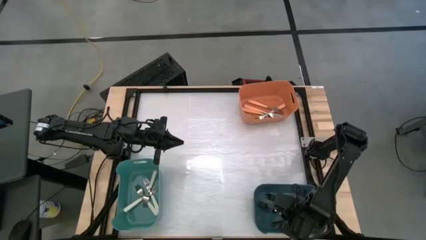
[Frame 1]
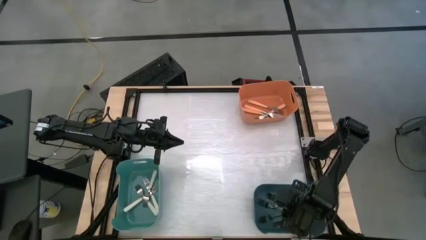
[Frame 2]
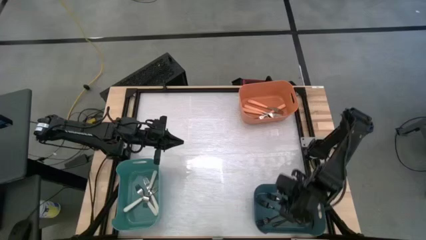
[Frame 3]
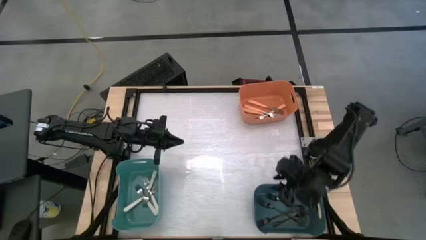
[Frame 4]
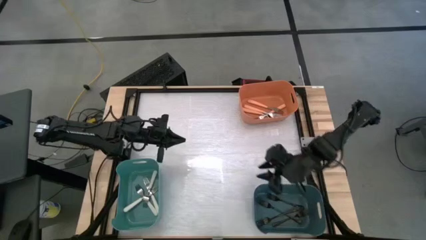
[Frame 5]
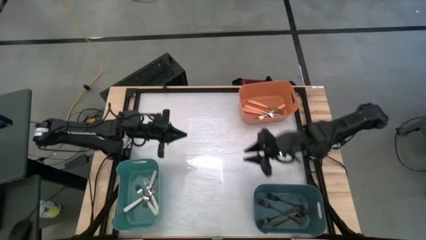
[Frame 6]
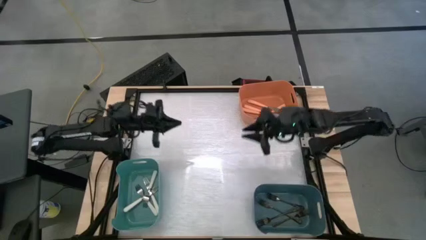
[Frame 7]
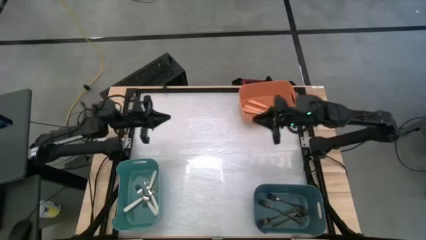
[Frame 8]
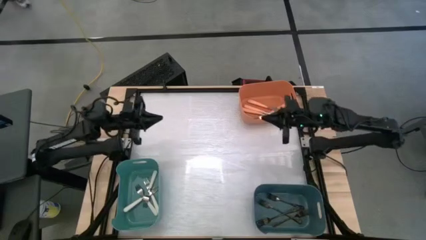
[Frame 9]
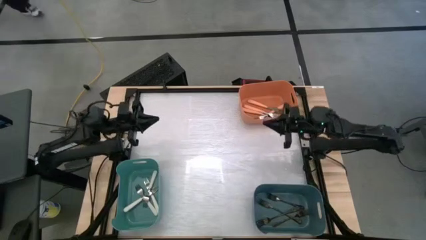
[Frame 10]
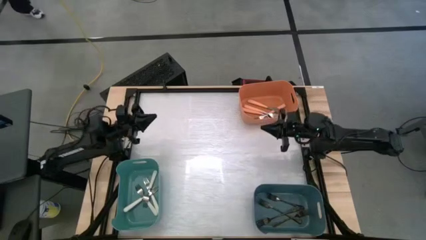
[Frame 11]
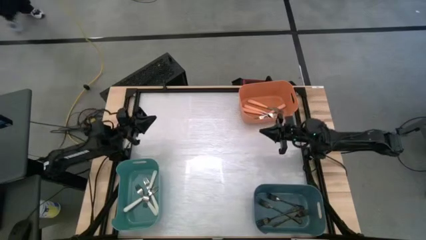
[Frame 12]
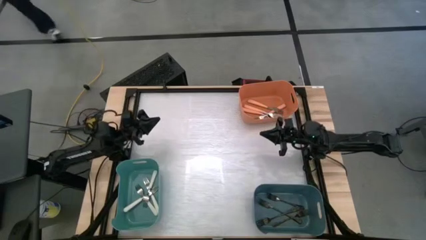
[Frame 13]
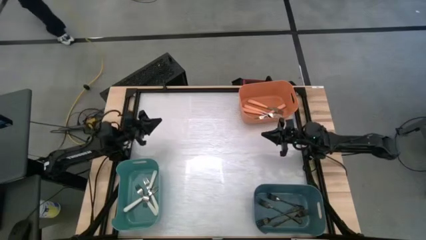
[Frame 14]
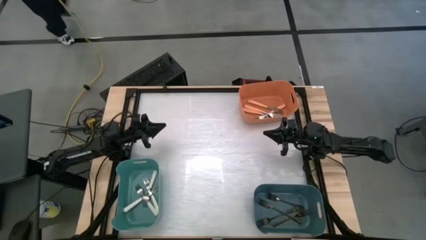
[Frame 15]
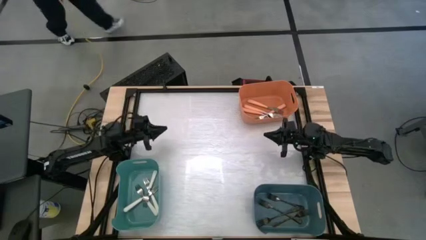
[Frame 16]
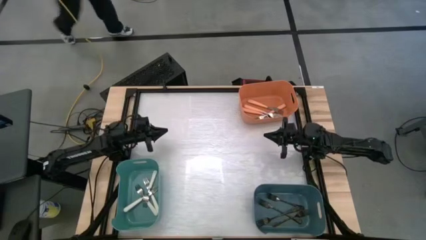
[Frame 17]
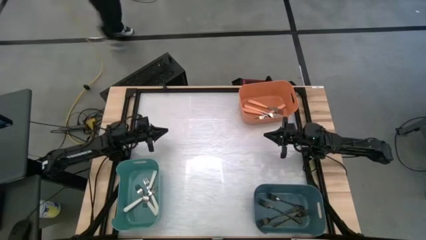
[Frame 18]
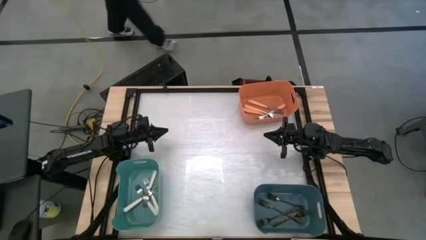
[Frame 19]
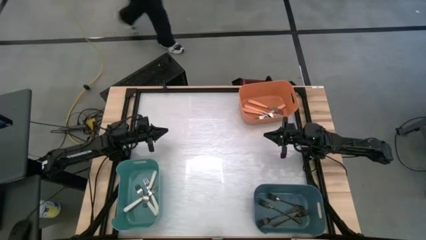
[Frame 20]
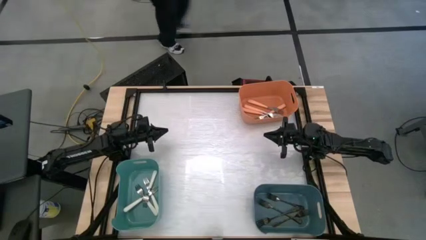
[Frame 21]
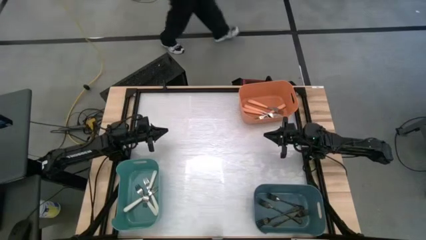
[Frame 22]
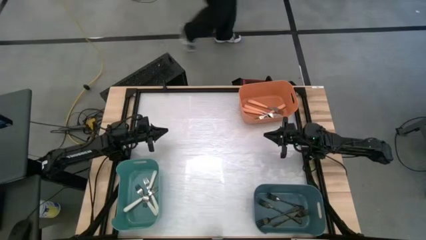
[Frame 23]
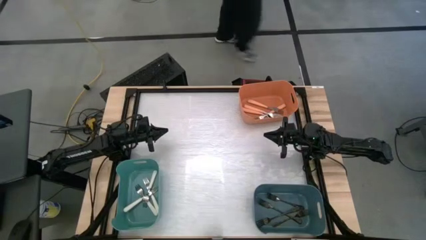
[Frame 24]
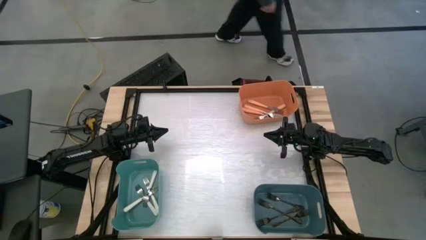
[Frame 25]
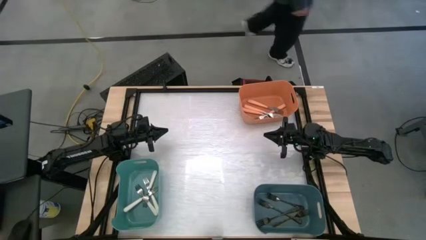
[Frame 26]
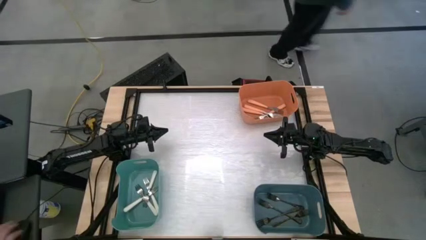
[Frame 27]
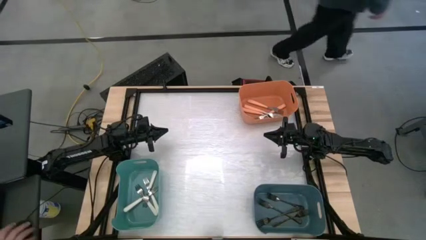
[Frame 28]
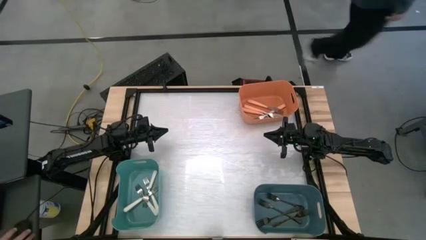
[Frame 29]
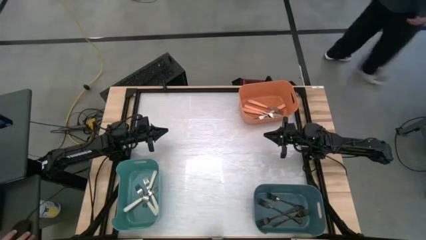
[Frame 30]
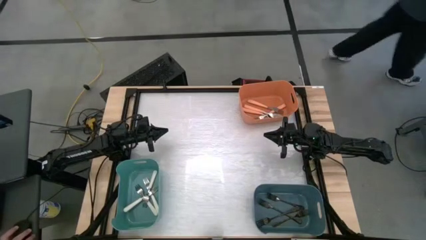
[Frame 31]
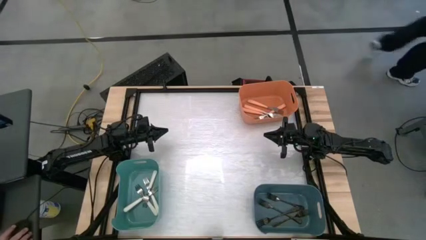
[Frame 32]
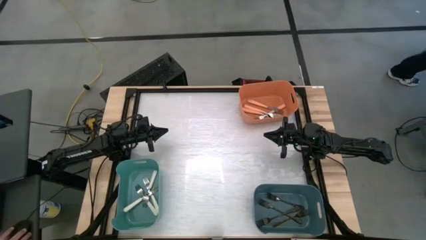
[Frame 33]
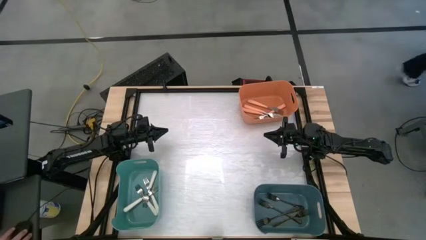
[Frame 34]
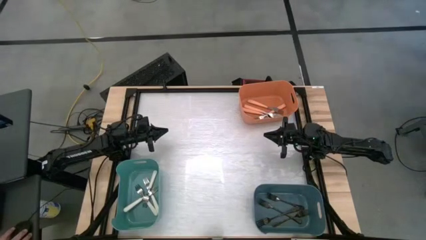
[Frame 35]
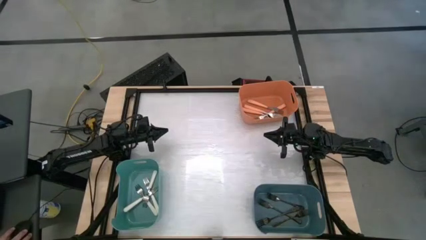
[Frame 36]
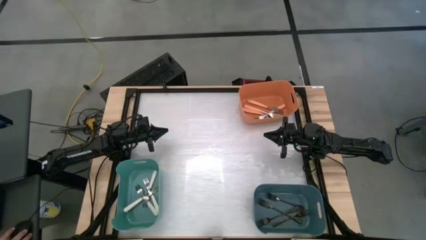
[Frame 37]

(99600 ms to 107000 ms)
Task: Sort silverware by color (type)
Return to Home Position

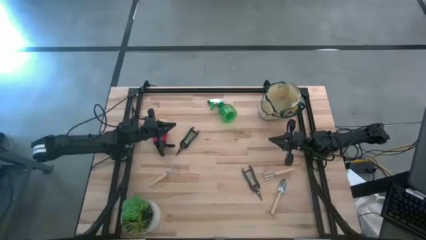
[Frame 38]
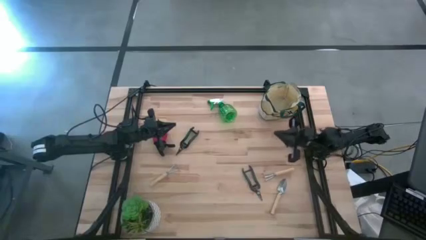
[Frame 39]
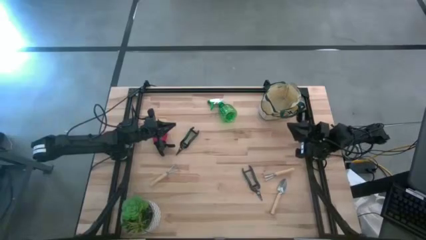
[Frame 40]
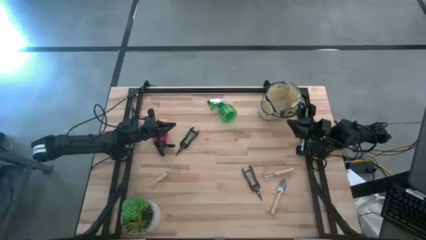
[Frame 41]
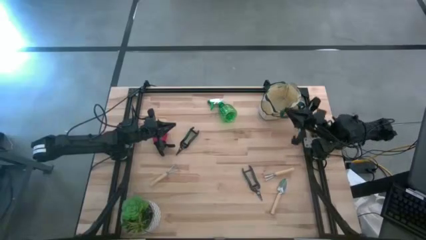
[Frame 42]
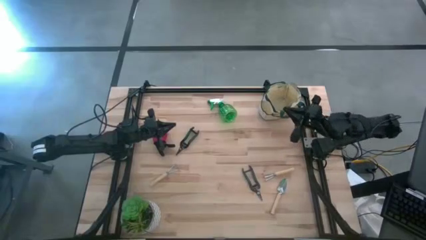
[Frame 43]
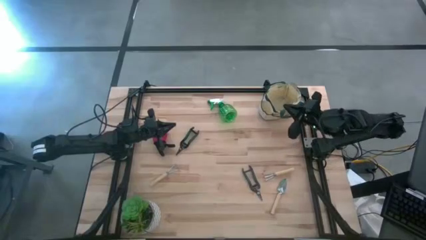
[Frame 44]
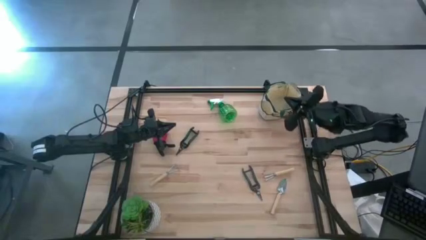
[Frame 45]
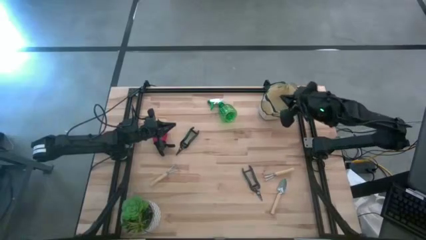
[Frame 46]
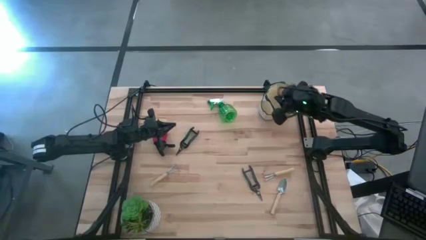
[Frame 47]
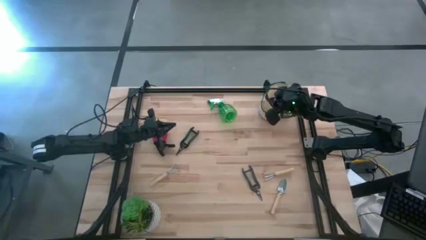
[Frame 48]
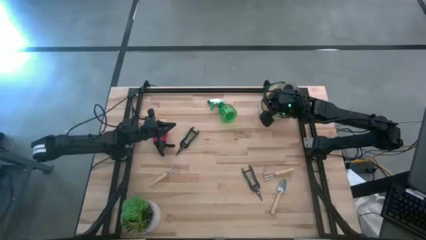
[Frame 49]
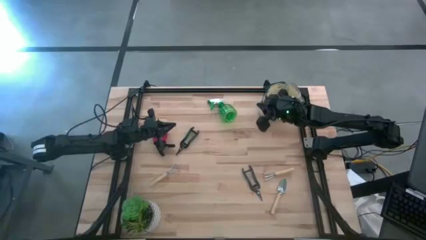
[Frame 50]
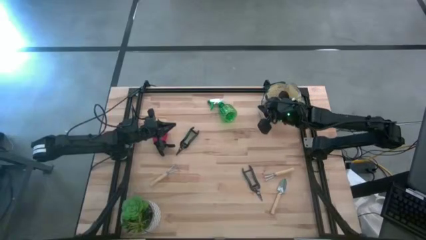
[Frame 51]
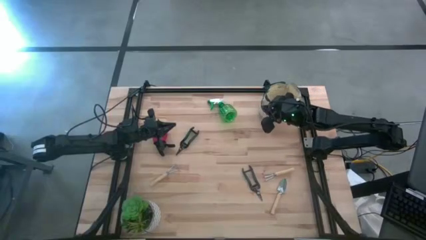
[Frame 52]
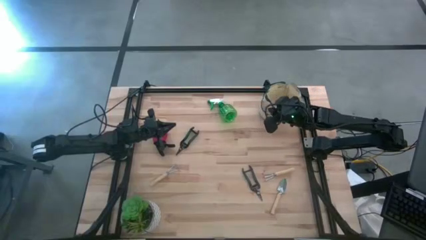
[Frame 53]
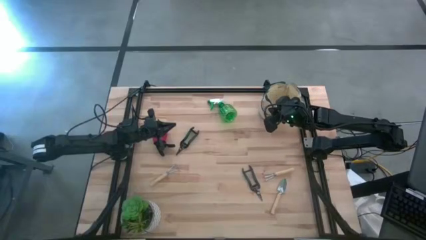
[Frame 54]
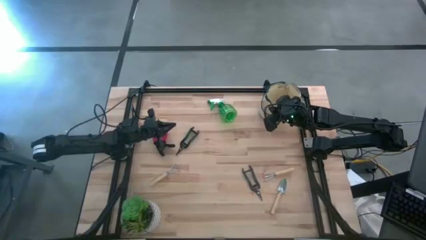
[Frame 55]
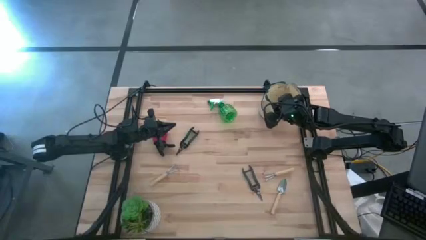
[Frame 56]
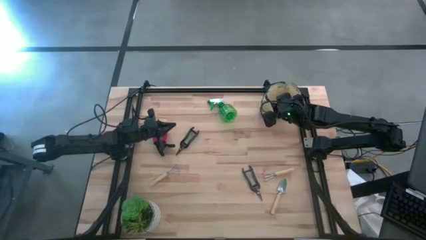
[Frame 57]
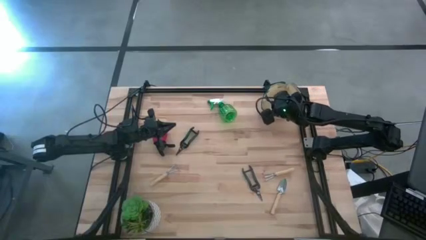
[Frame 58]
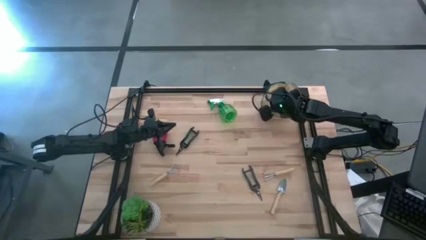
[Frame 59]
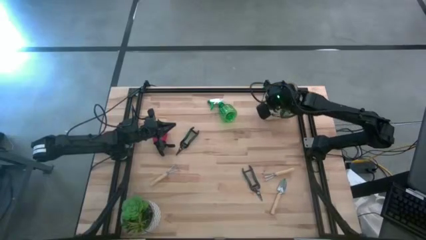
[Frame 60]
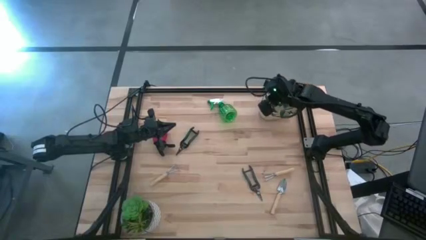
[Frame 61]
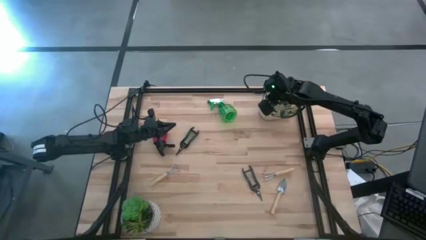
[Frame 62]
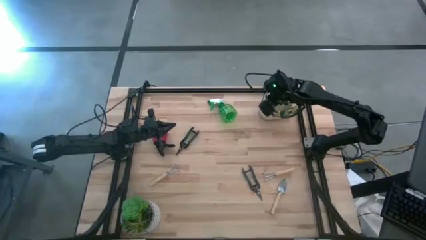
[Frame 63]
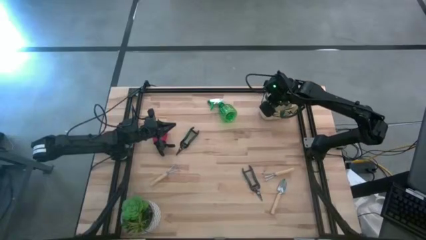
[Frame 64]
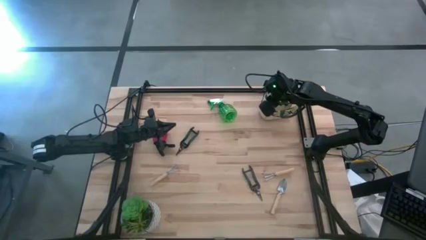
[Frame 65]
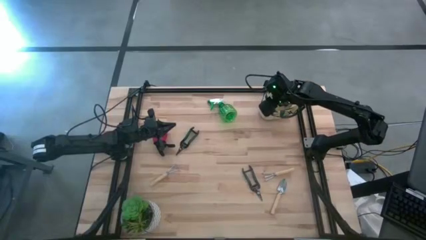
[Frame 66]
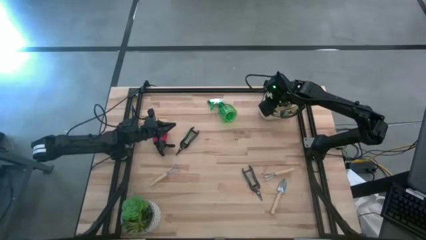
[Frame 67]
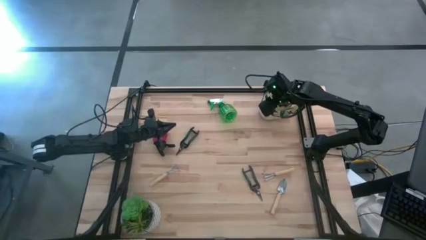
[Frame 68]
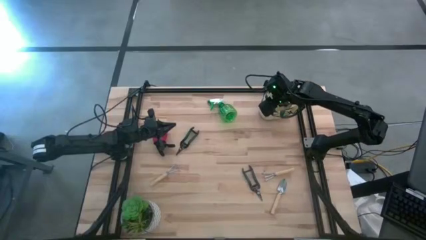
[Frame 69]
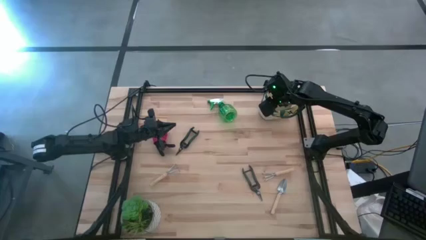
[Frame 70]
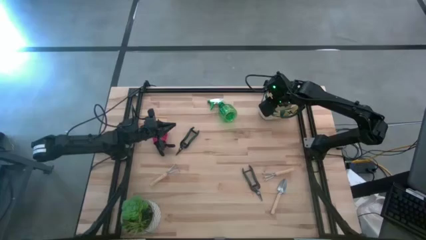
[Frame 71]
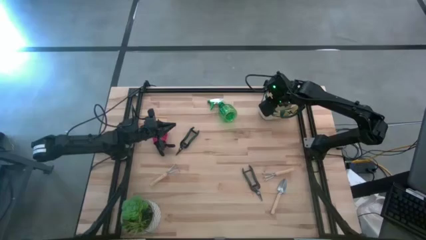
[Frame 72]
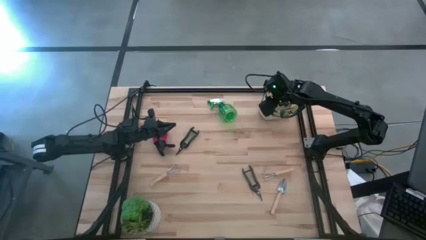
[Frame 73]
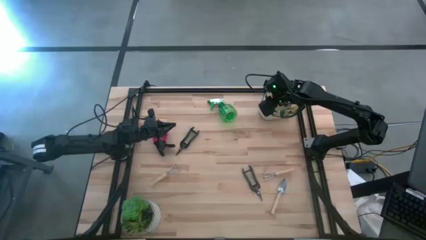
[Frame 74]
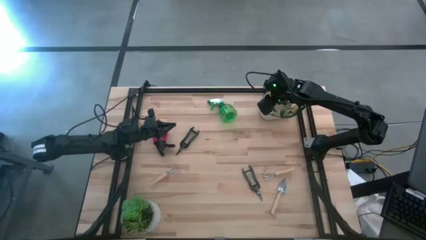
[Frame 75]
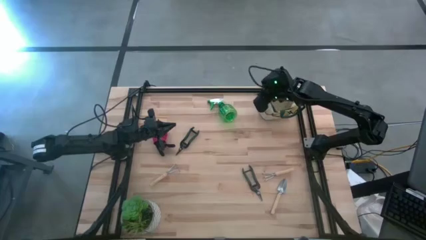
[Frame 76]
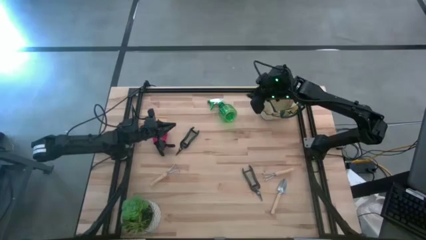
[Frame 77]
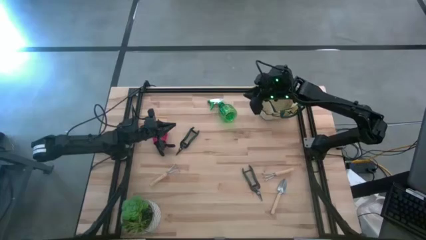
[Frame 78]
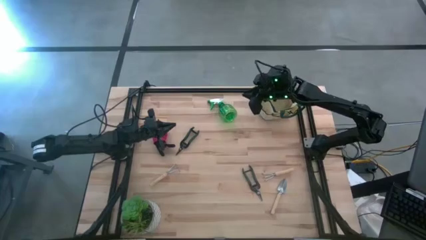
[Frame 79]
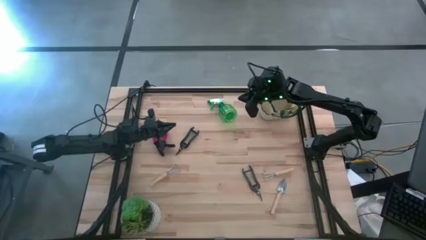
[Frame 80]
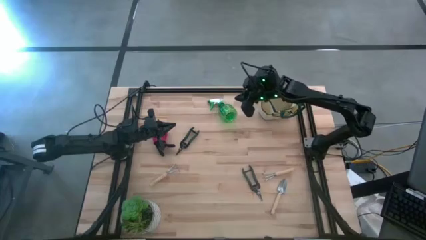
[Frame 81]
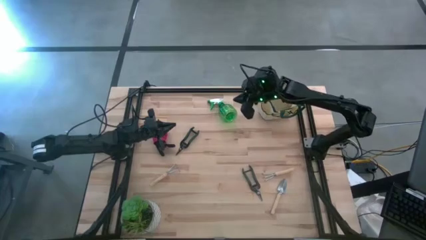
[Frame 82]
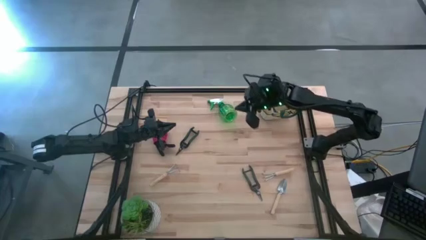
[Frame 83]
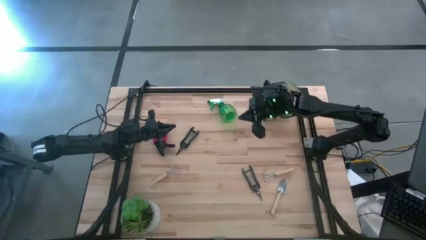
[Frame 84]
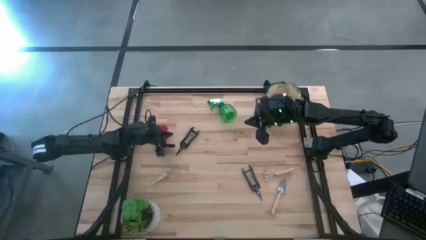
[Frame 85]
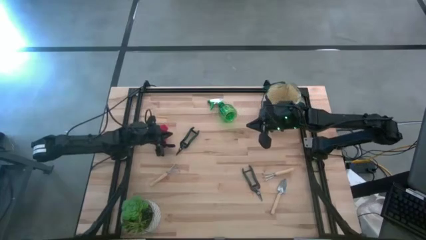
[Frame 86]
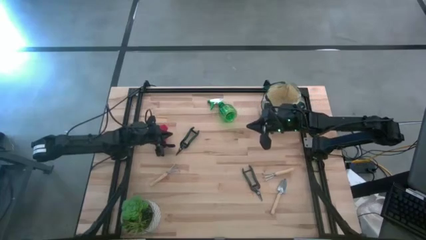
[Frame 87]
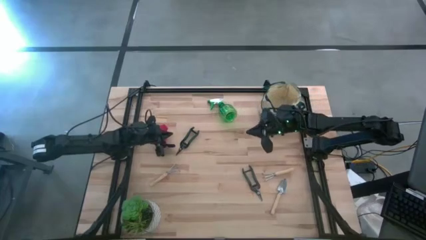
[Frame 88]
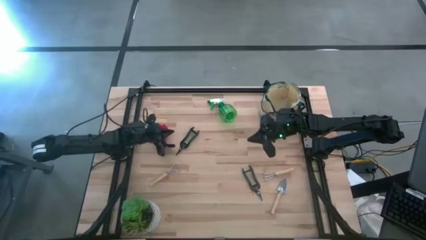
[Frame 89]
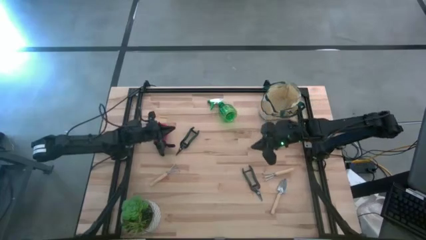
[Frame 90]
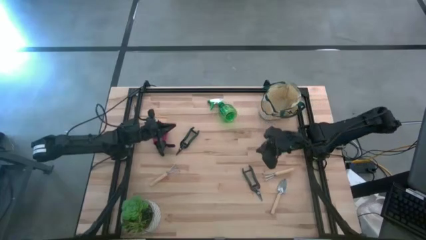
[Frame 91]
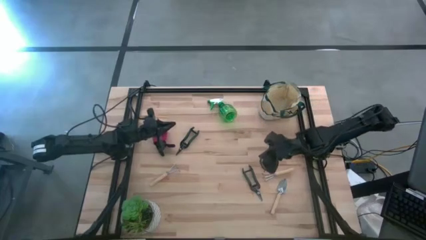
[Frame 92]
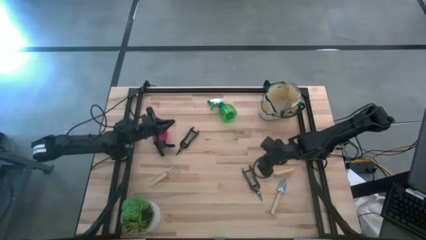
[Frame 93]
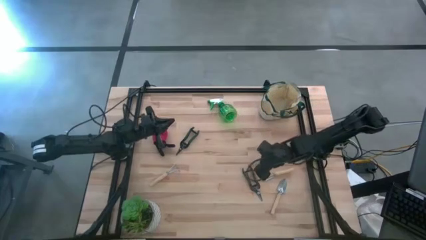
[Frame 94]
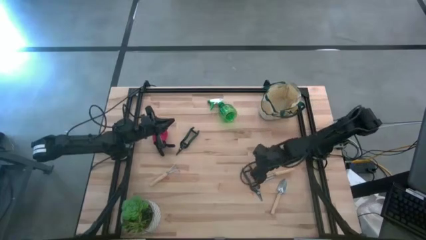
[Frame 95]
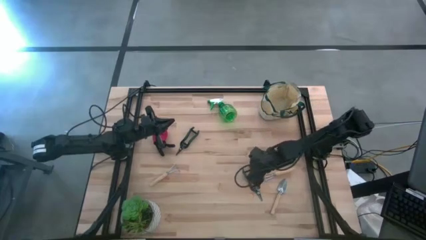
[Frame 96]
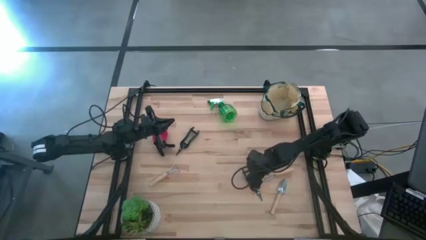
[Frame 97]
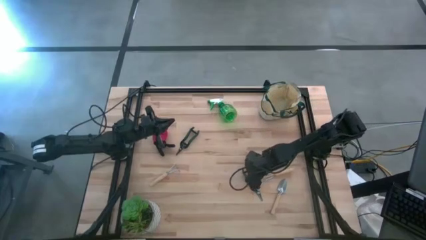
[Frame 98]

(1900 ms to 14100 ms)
Task: Pick & Place Garden tools in Gardening bag
Put the right shear scissors into the gardening bag
